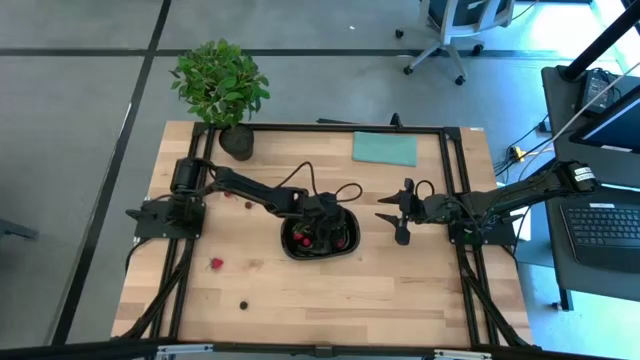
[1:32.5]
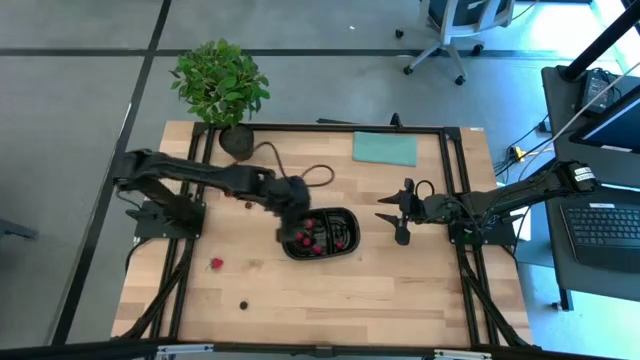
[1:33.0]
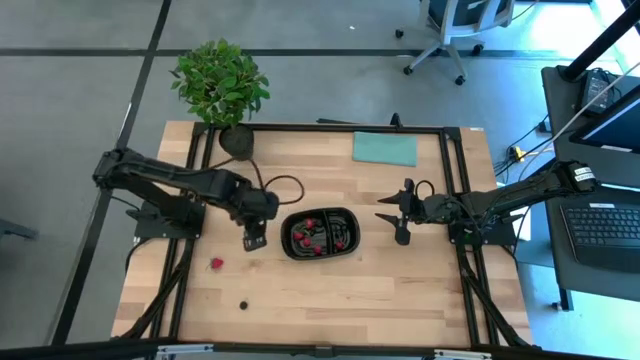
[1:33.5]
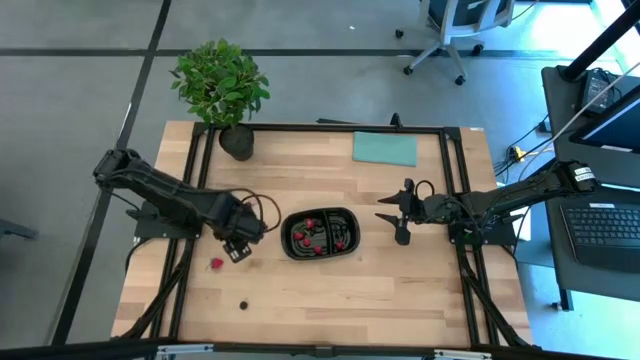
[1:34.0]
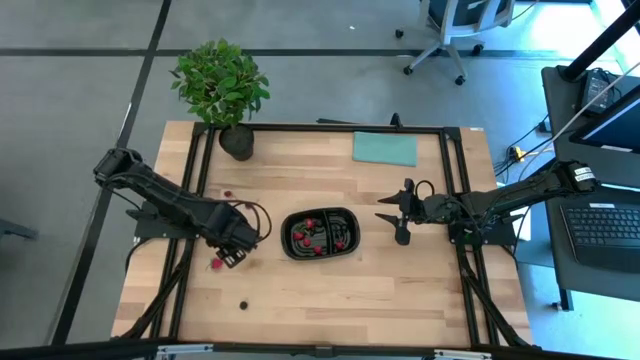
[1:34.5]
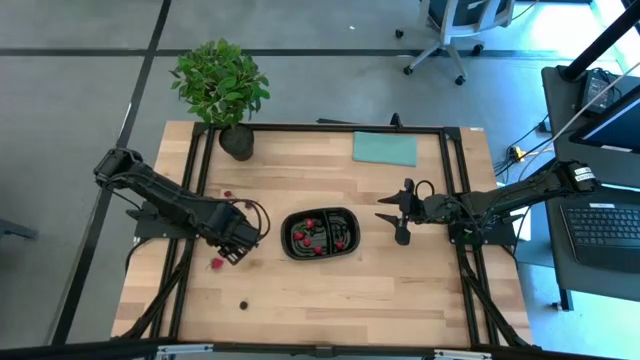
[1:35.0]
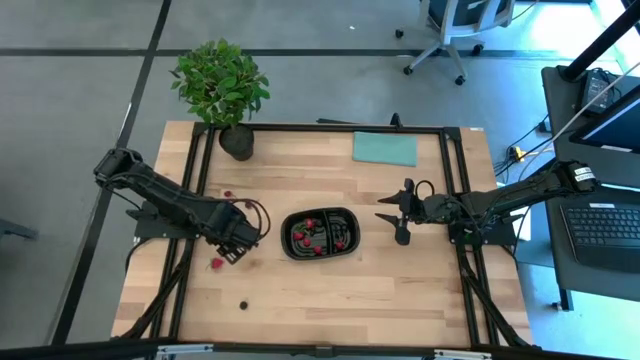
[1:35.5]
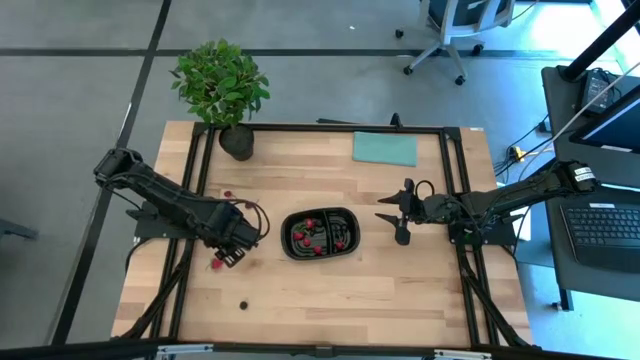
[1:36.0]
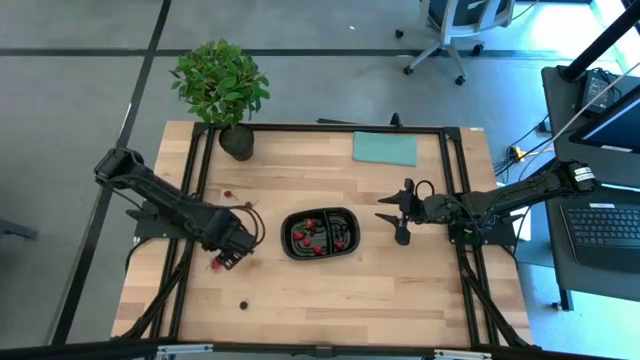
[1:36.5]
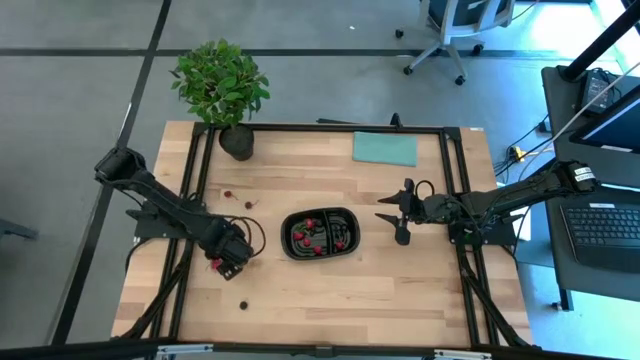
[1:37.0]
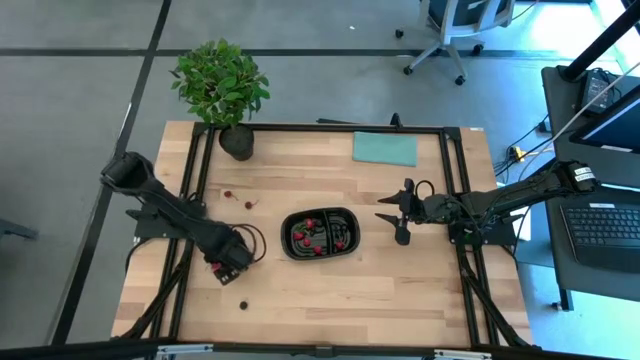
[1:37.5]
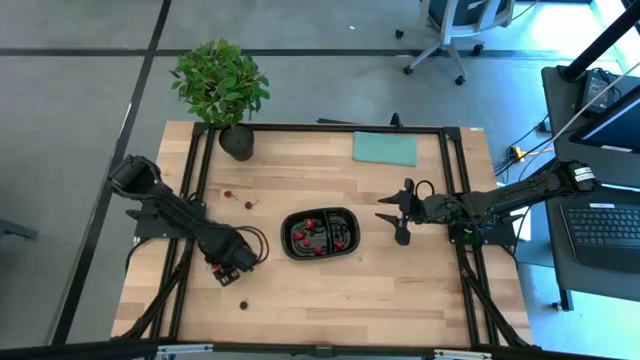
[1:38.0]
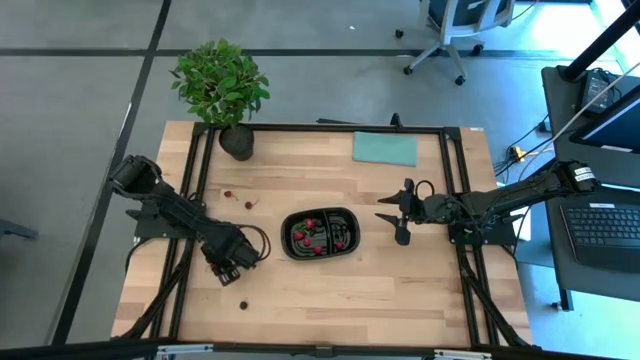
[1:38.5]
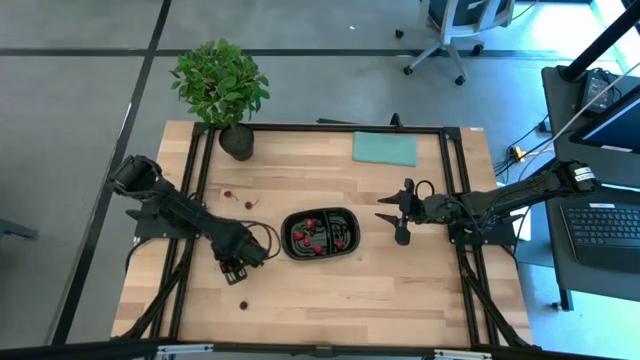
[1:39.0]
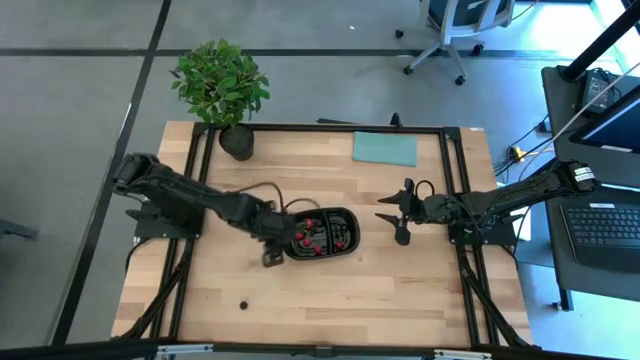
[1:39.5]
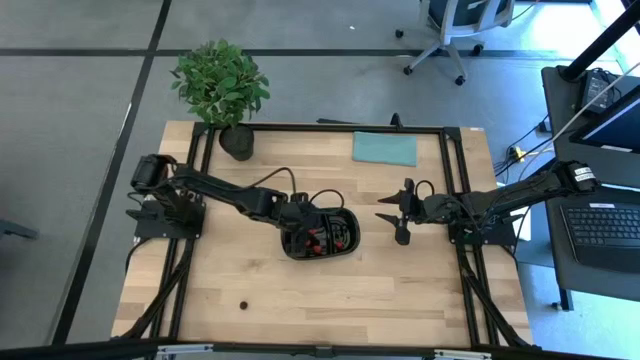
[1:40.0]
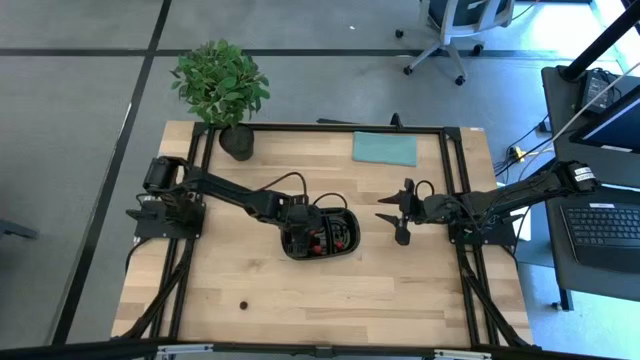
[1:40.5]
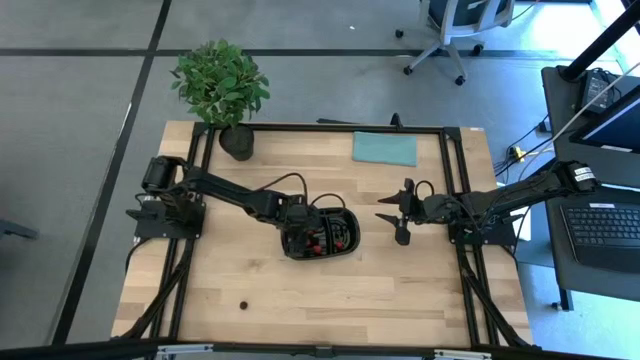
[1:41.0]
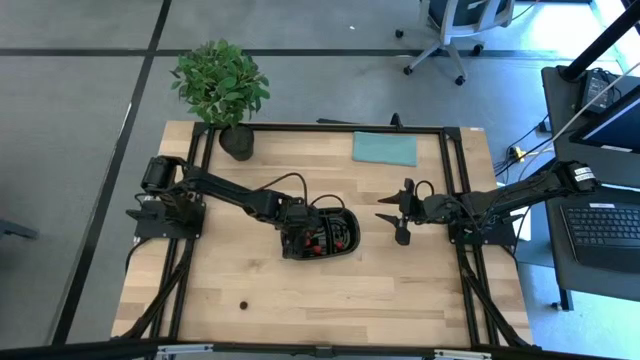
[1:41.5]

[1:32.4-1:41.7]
Task: Pick and placing Produce into tupperware
Put the strawberry into the left section of the black bin

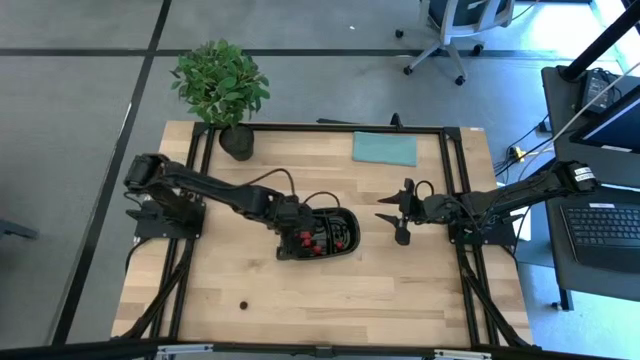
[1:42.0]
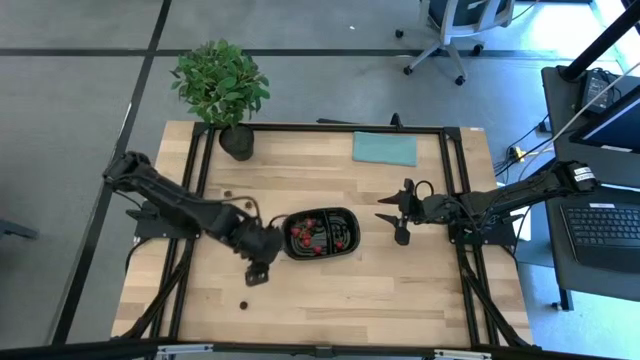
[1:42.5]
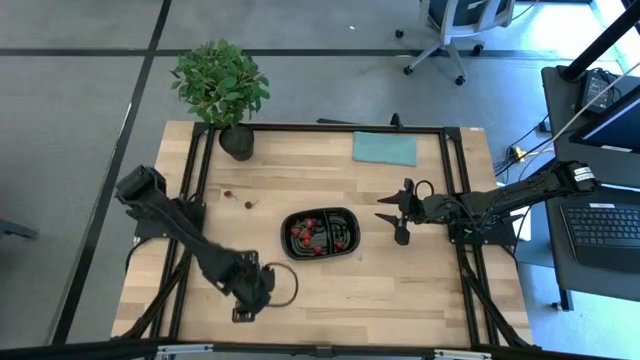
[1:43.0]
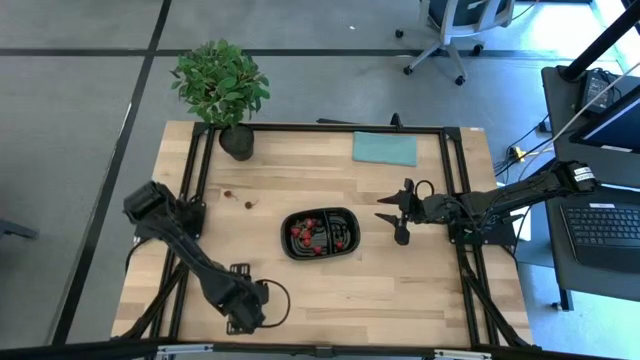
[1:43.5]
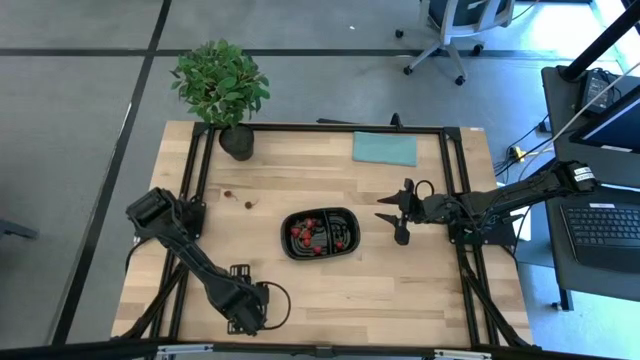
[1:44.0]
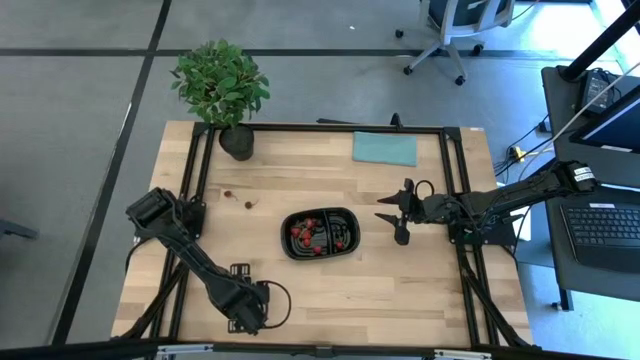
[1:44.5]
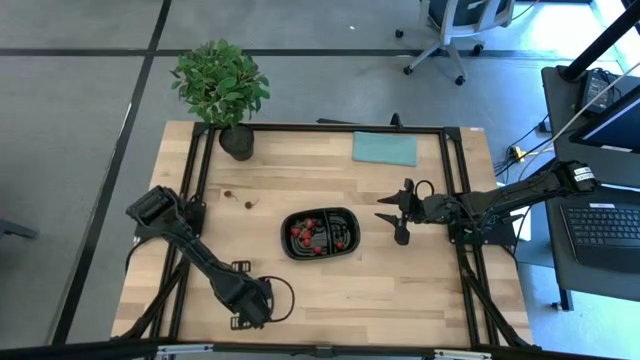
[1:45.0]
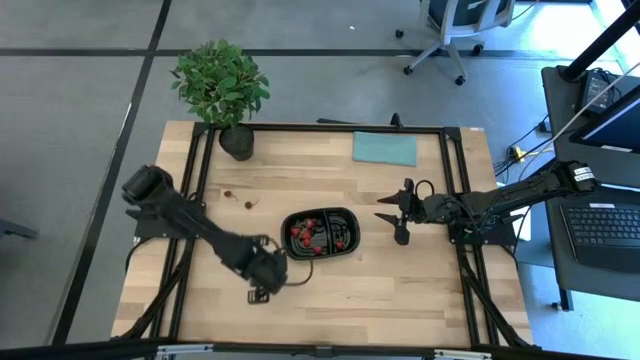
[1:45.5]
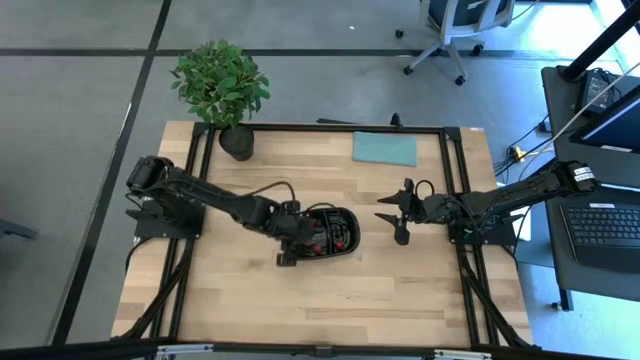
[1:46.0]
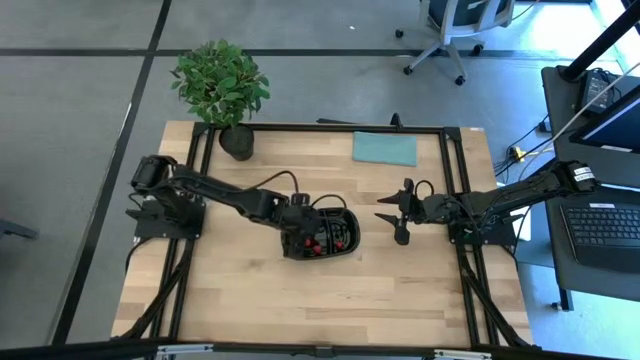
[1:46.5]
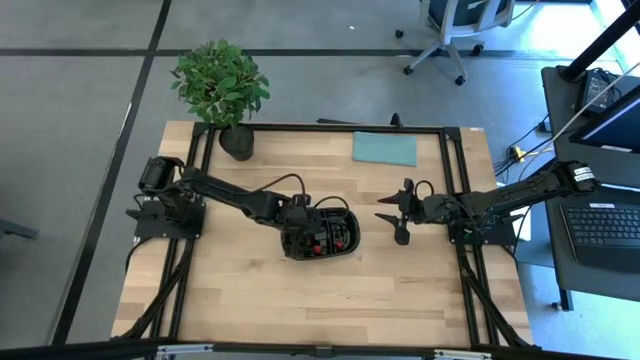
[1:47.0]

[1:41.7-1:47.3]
Put the blackberry into the left section of the black bin

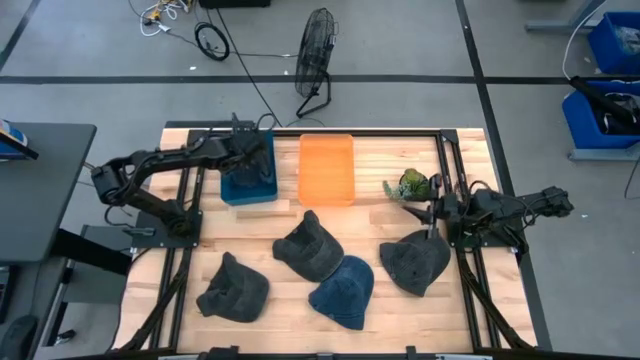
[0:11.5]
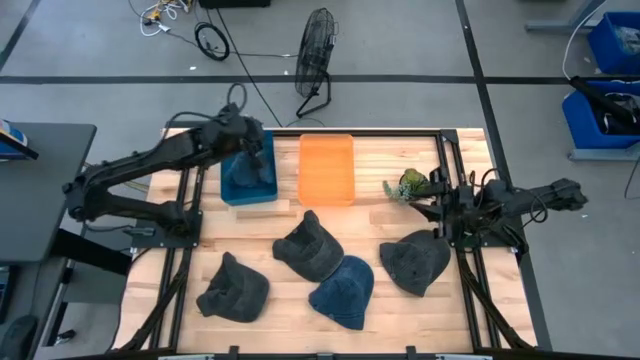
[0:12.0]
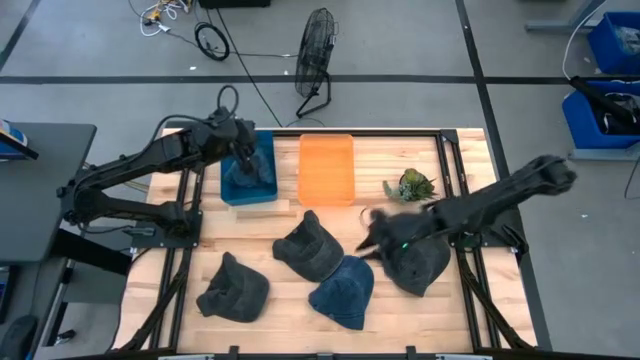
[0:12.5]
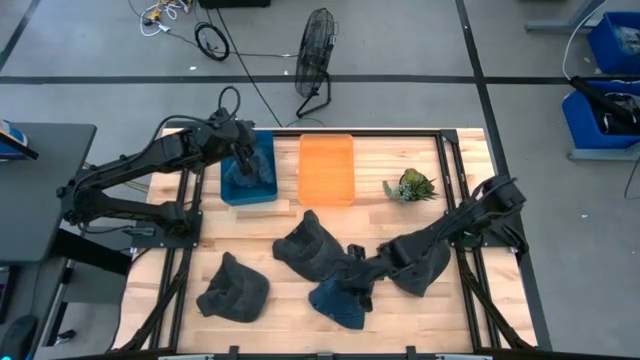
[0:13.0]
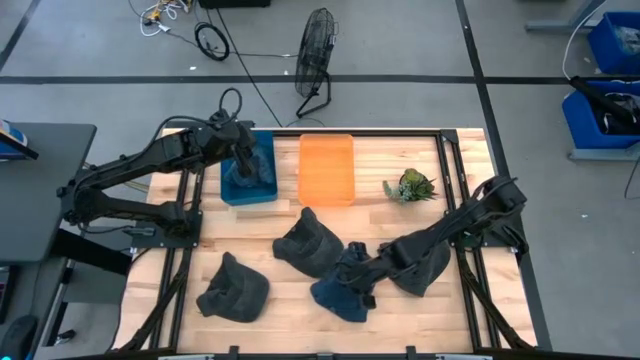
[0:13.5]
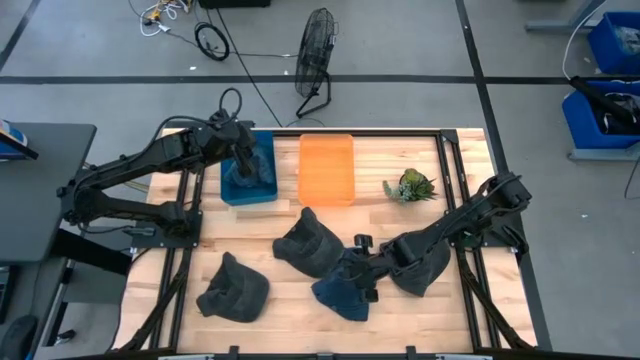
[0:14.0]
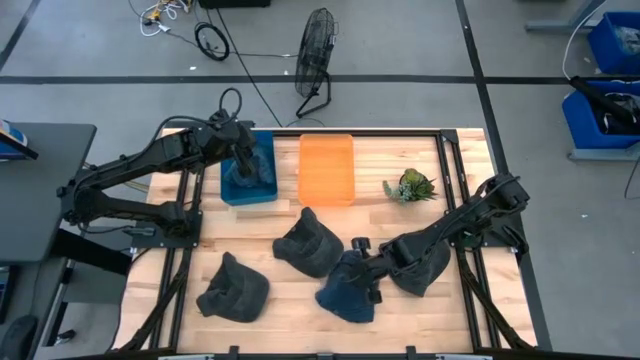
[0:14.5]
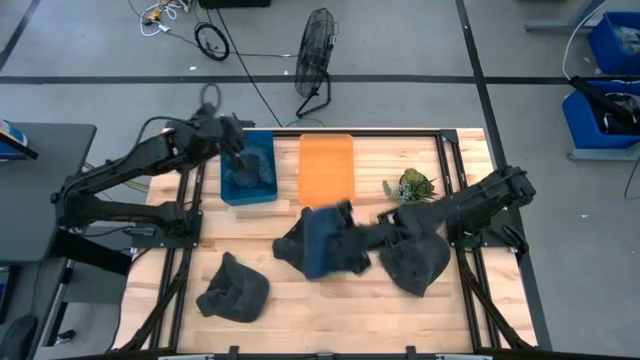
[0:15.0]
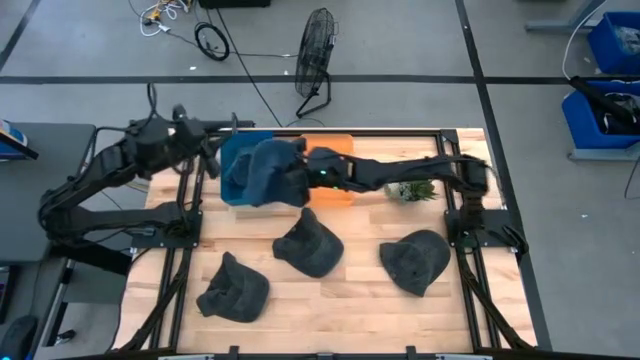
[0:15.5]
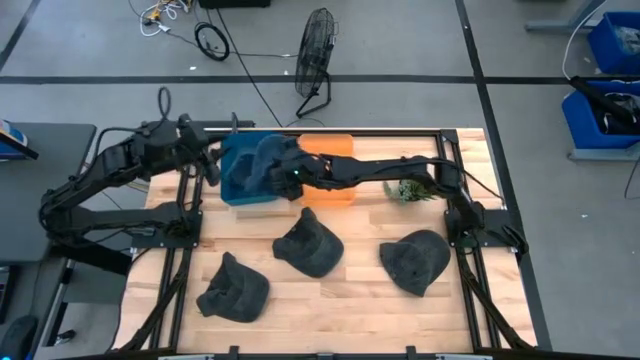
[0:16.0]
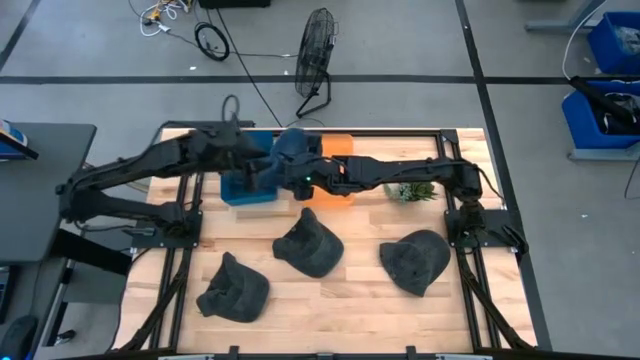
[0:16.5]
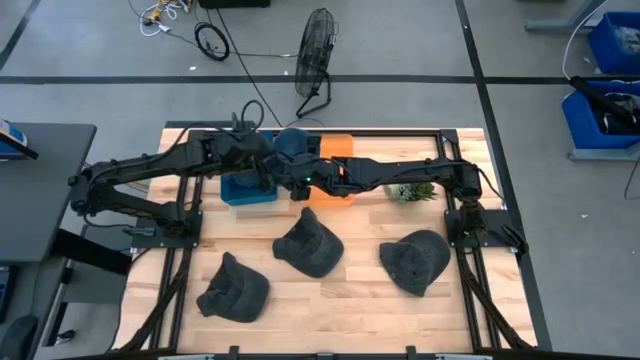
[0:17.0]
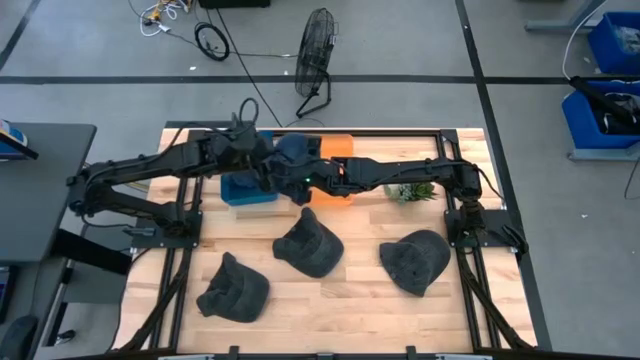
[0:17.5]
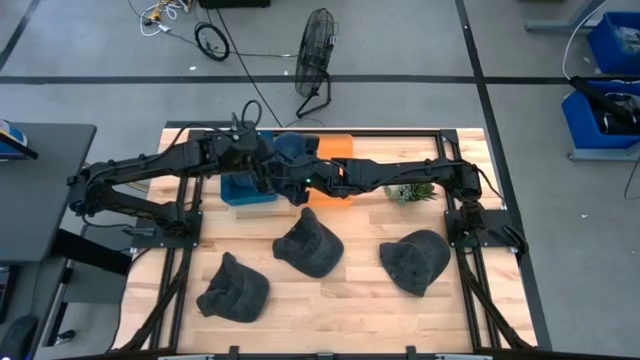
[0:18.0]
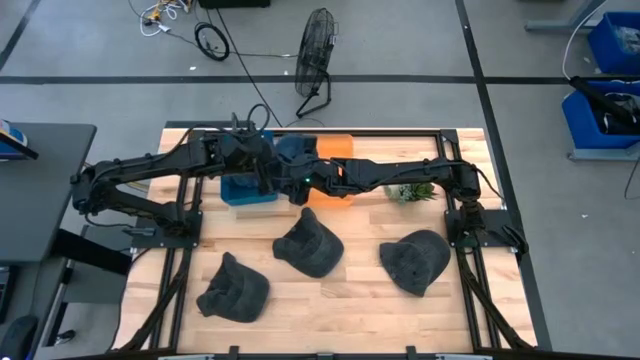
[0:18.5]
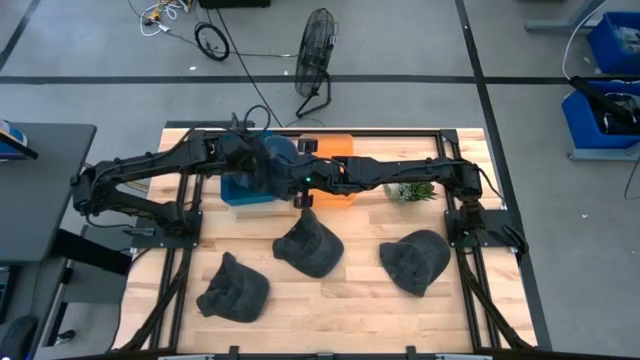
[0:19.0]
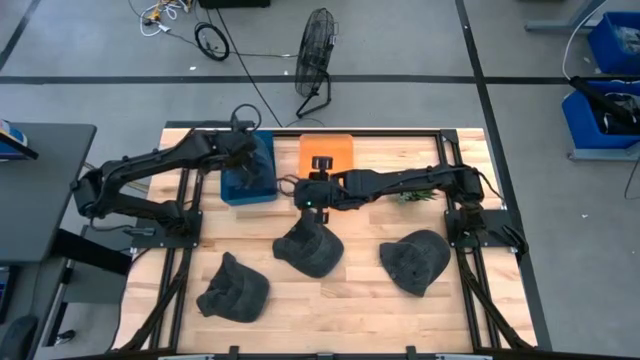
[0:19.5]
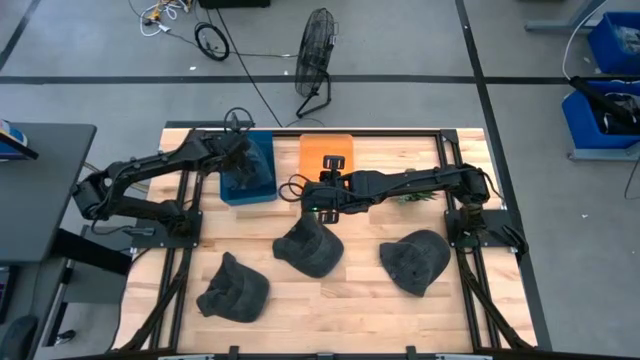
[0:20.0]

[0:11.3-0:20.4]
Task: Pick & Place hat
Put the blue cap into the blue bin
